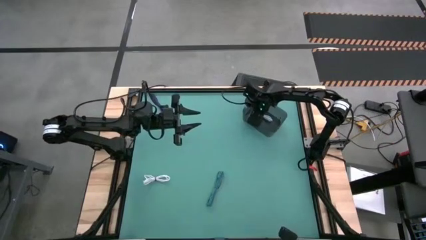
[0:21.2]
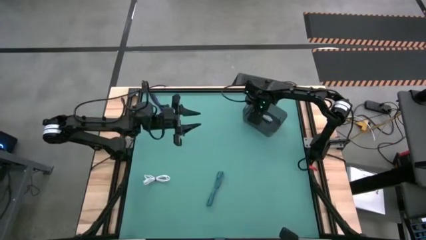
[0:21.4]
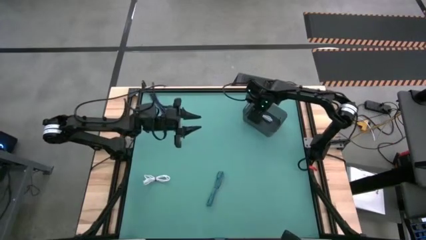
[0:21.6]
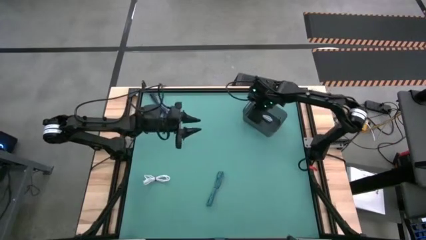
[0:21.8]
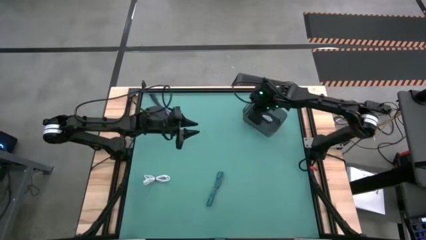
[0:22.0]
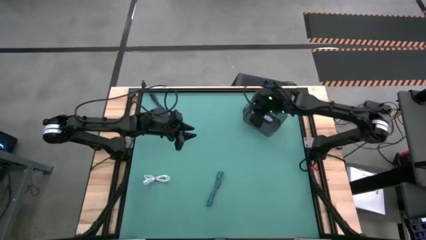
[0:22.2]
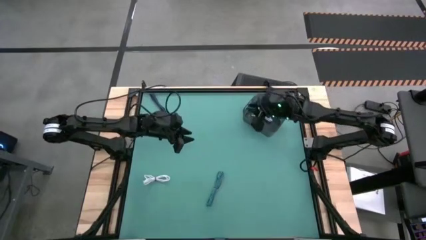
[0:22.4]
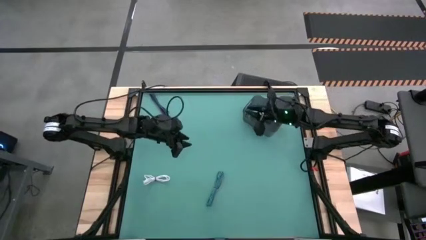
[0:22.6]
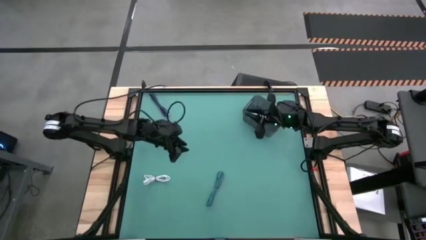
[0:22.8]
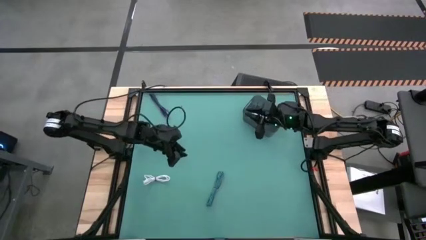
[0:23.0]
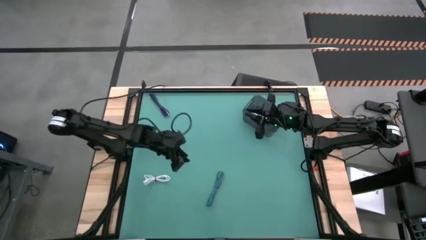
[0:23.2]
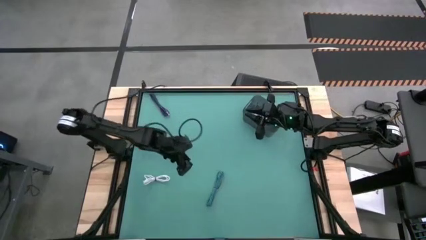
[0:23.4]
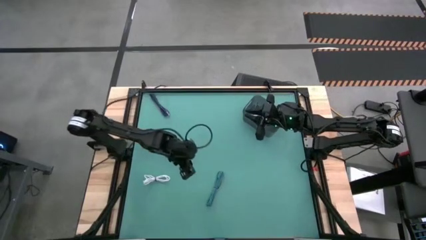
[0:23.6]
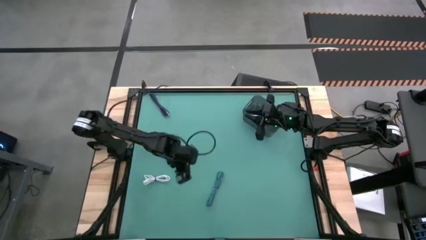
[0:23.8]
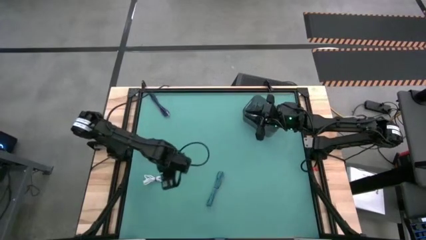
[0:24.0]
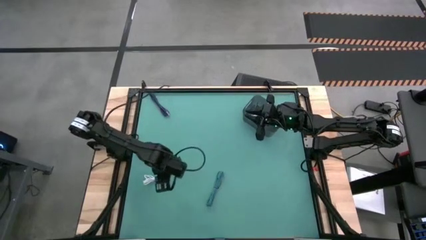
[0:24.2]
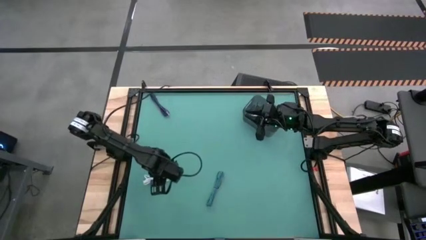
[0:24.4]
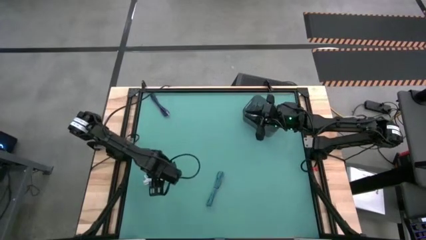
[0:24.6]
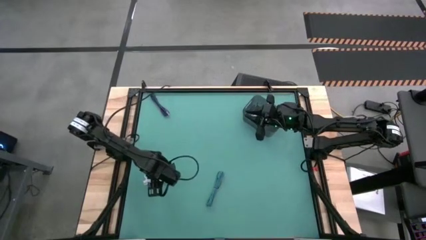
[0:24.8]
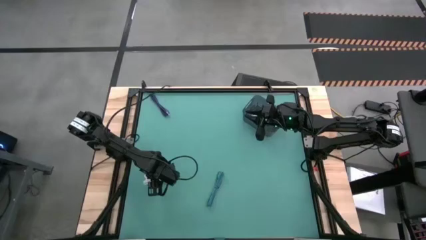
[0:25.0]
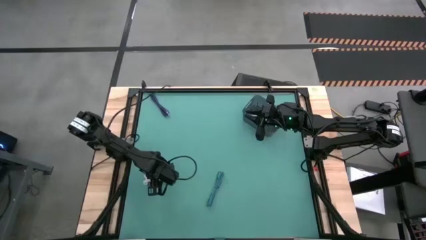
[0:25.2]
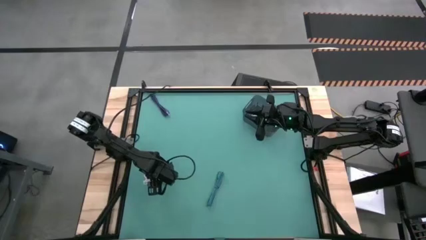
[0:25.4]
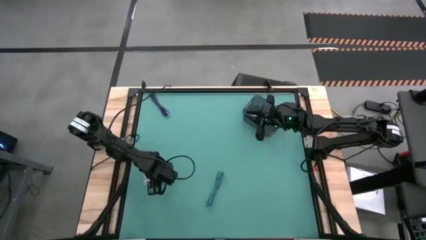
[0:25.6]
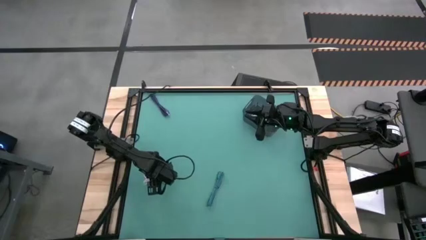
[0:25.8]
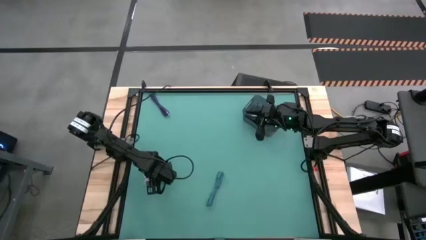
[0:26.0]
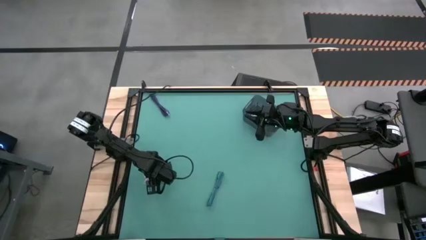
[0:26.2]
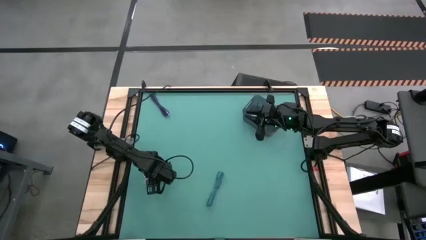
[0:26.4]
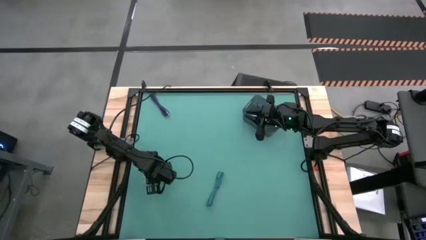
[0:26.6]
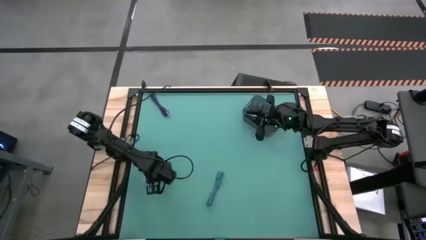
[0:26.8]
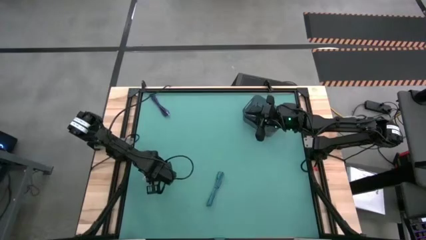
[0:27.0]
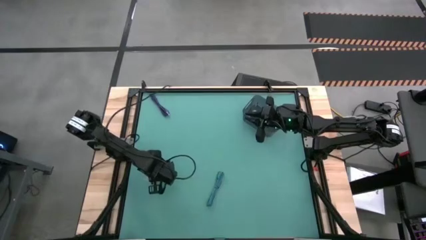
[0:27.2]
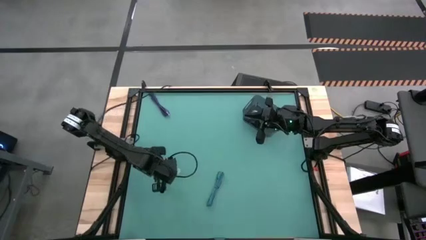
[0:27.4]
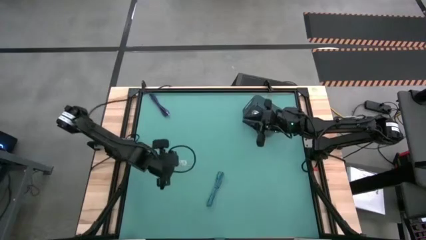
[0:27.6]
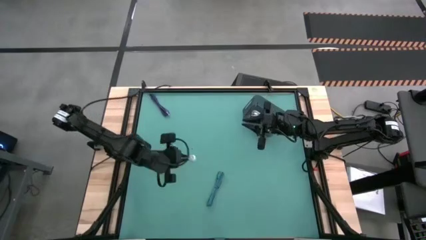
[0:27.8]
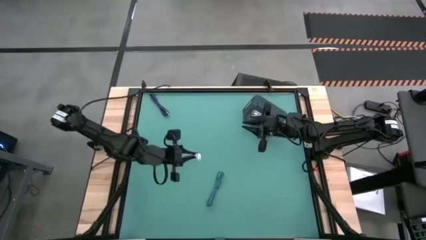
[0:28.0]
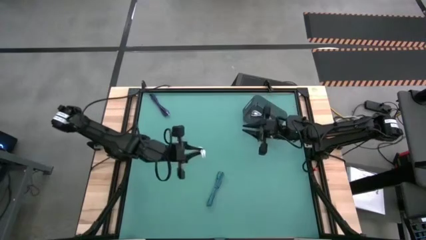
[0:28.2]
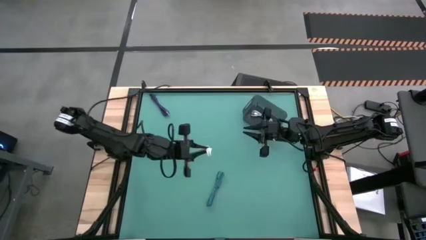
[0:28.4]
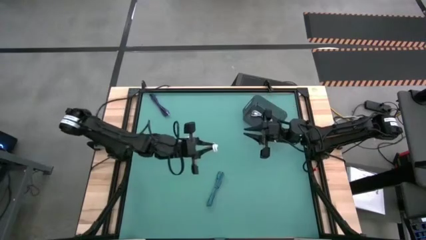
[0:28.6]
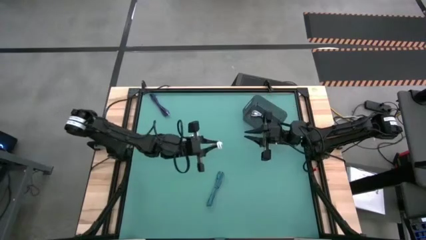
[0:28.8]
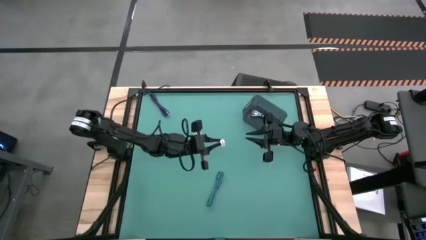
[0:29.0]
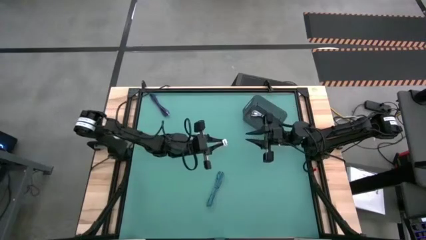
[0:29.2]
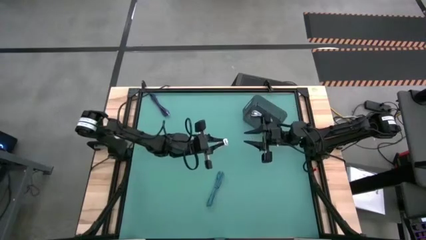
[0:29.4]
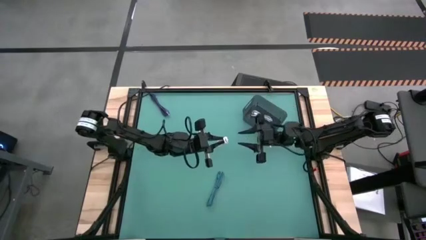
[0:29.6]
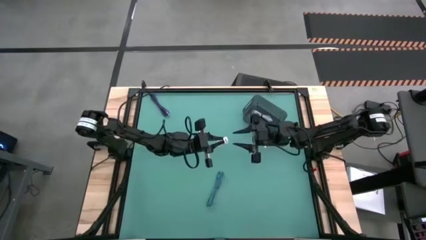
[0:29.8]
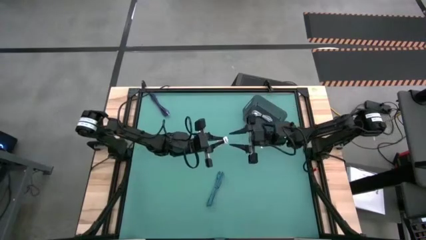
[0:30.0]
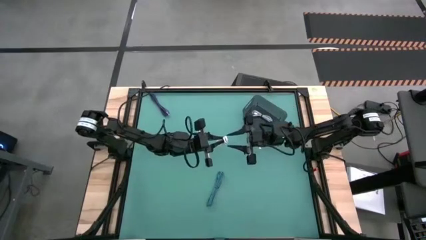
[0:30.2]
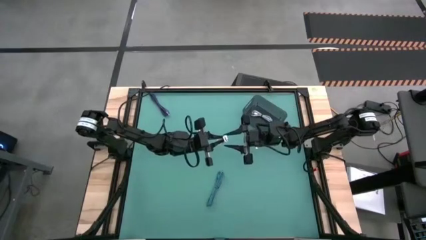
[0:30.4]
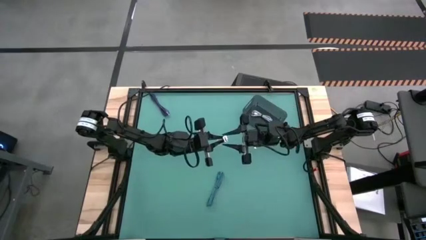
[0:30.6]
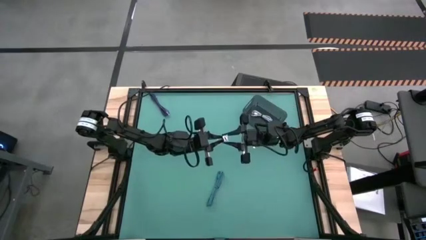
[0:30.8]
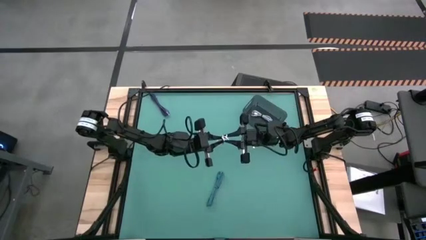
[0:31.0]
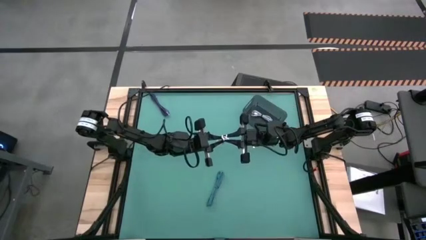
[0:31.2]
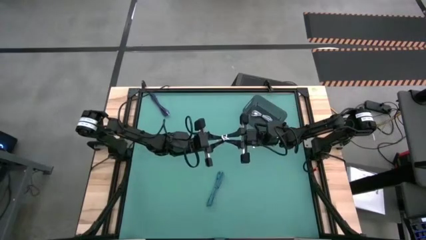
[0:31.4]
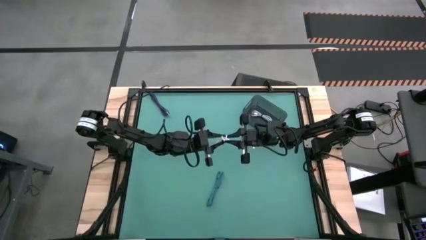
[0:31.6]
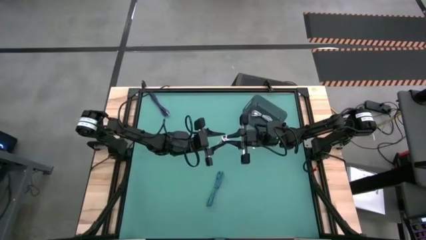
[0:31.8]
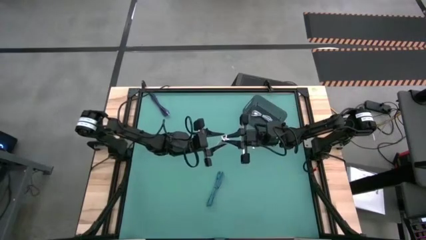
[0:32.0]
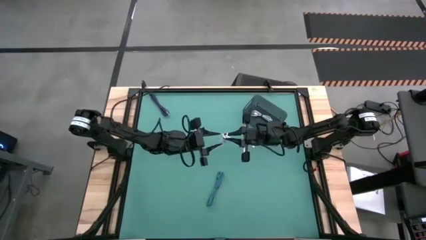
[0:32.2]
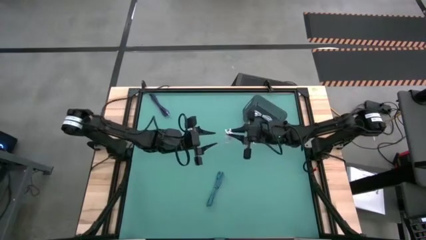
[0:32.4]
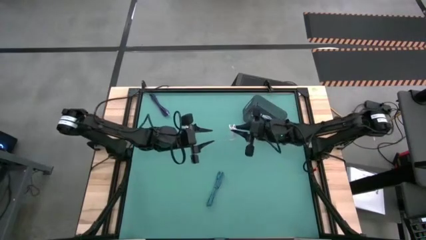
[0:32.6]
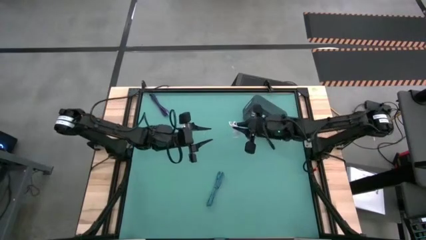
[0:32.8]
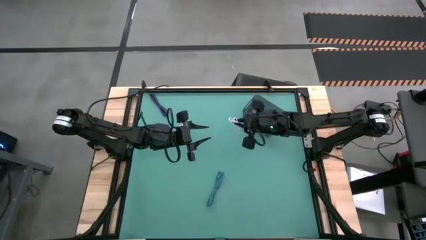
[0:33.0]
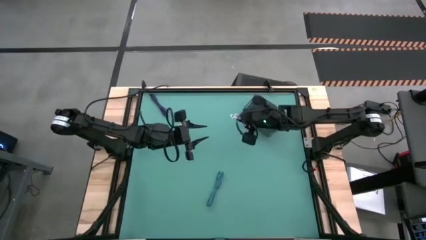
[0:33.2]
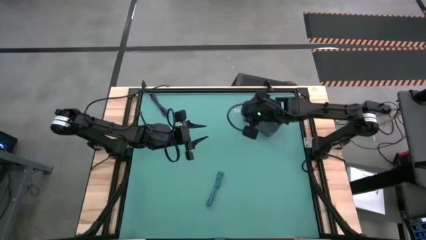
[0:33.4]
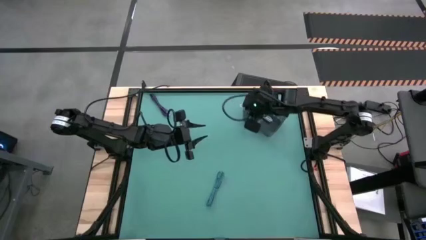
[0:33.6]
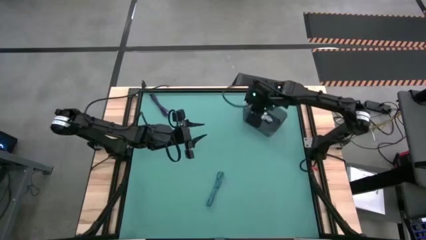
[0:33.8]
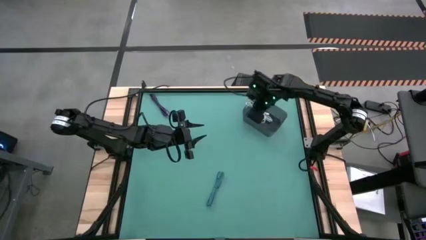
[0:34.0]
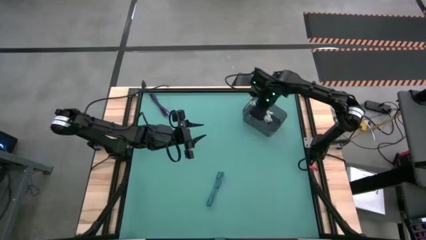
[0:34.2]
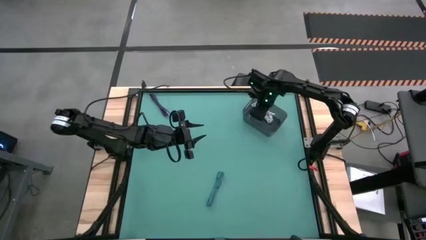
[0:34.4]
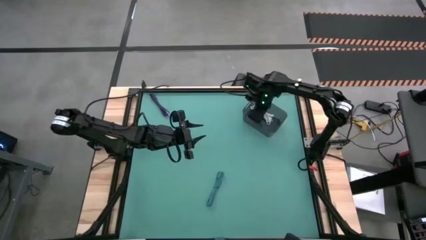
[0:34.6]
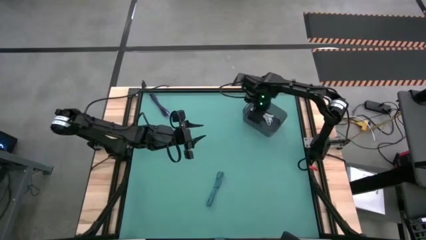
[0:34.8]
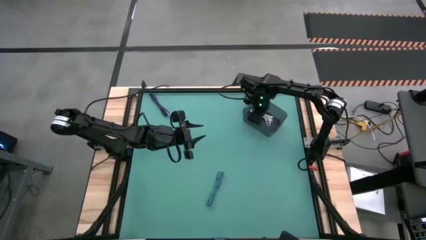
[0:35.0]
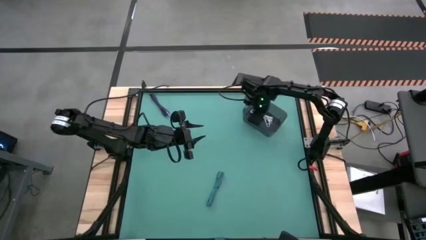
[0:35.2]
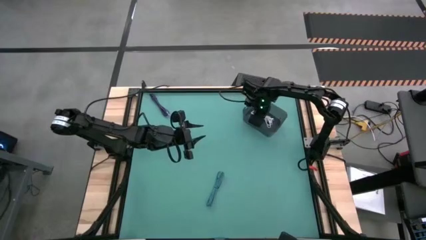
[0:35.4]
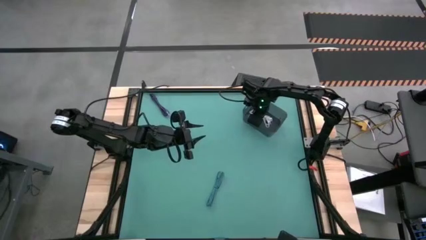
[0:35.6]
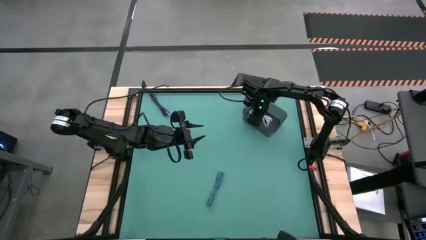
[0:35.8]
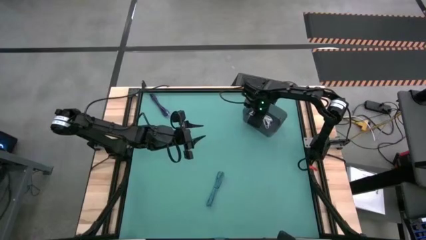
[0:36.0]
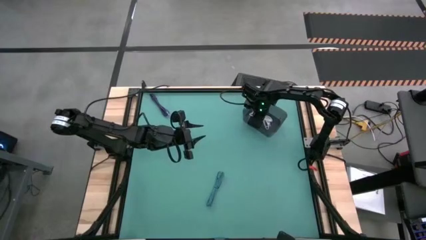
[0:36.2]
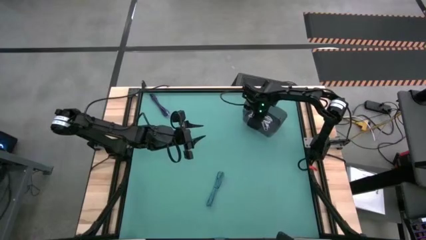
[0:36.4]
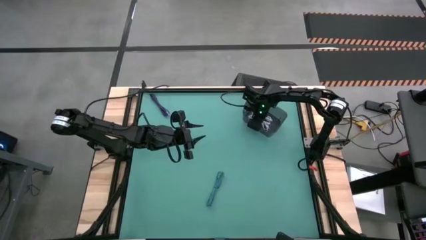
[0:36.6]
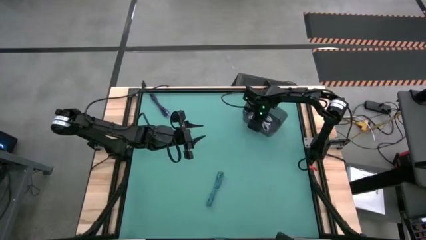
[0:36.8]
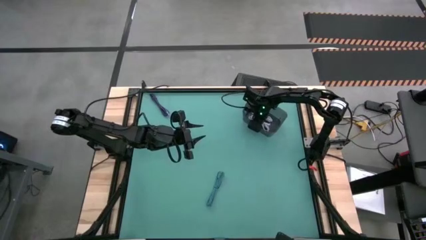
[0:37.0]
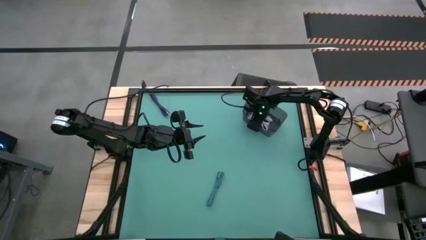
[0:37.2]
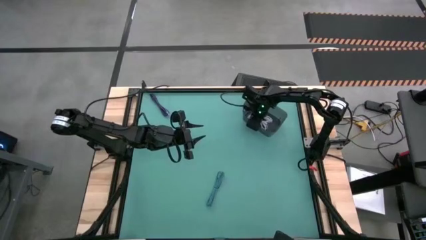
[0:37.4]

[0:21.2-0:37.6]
Task: Pick and place USB-C Cables
Put the white charger cable into the black container
